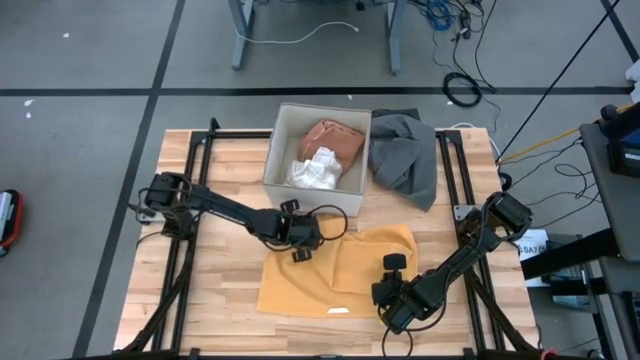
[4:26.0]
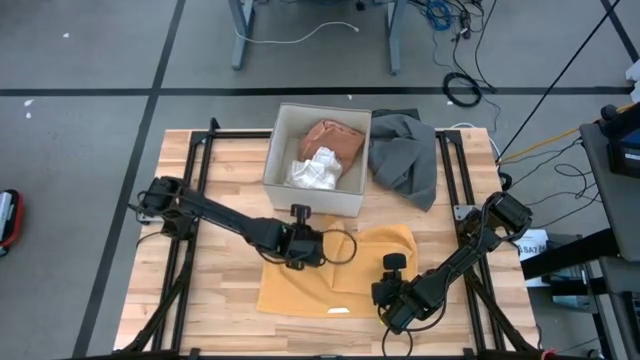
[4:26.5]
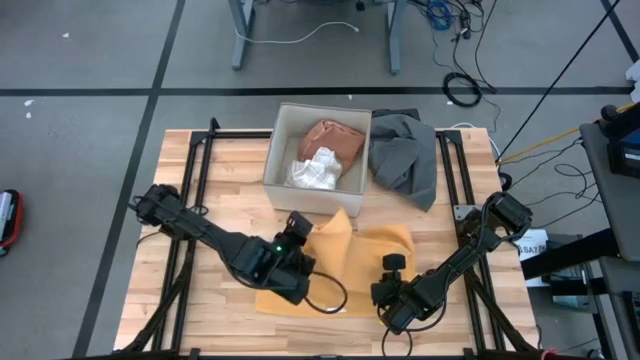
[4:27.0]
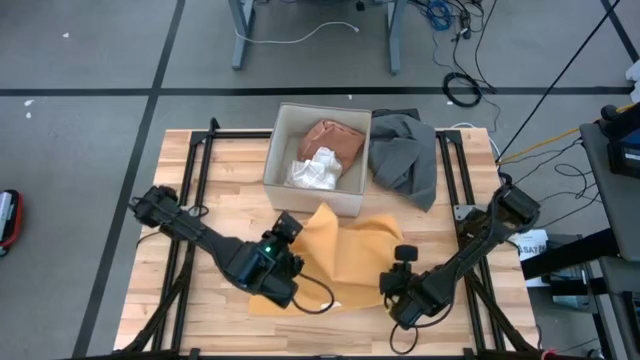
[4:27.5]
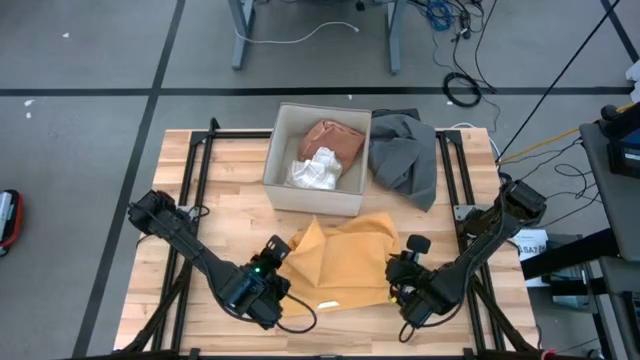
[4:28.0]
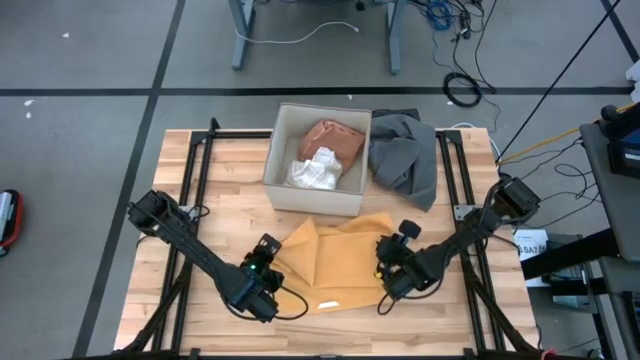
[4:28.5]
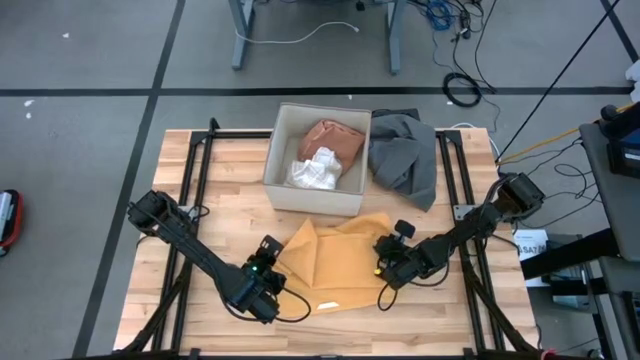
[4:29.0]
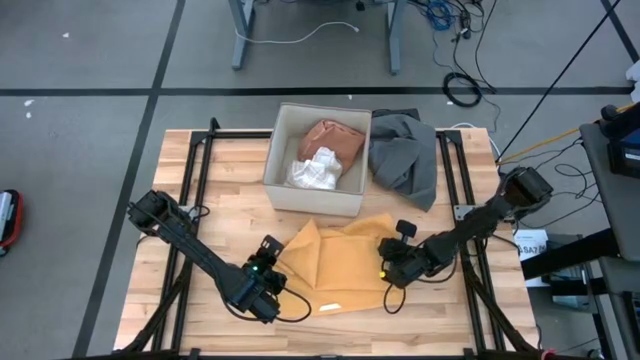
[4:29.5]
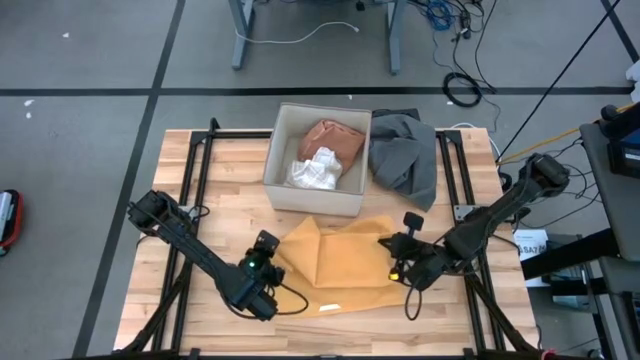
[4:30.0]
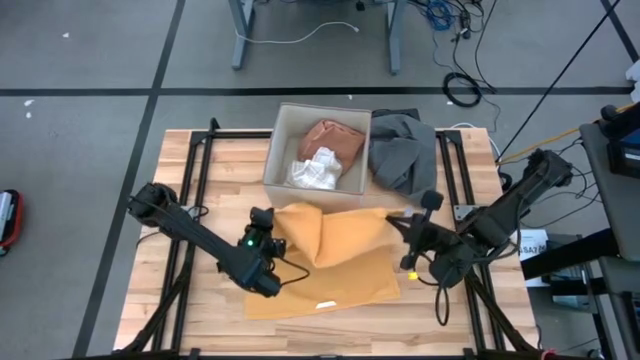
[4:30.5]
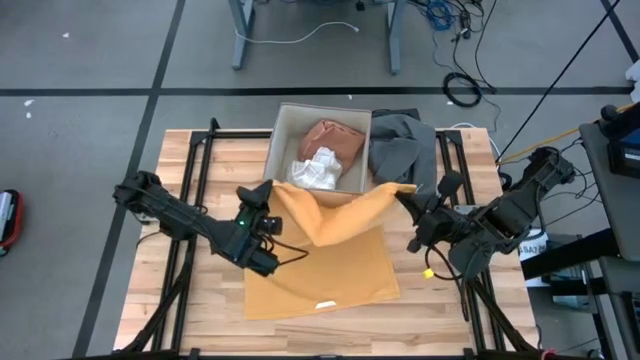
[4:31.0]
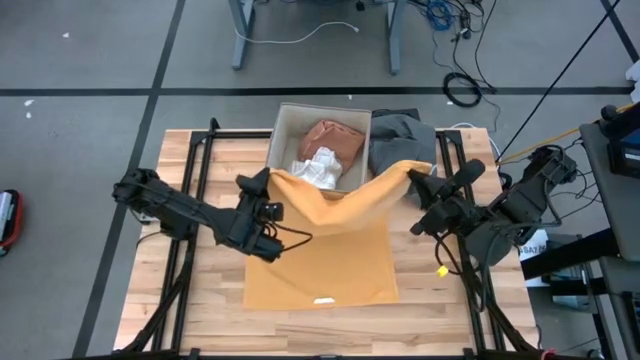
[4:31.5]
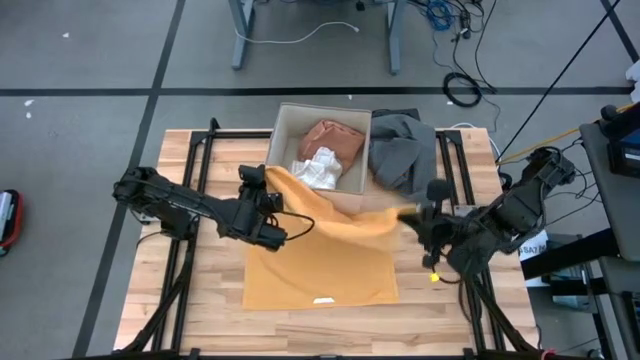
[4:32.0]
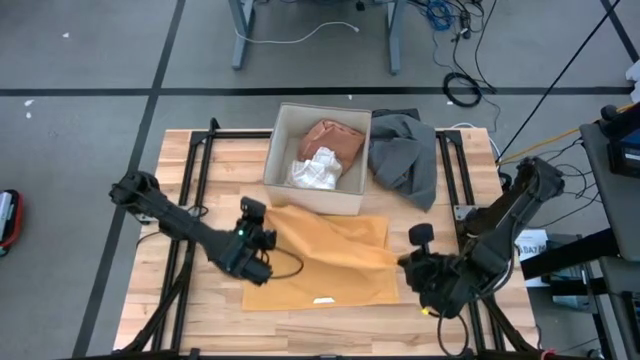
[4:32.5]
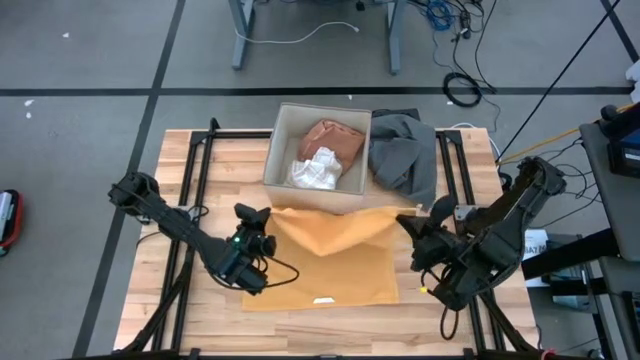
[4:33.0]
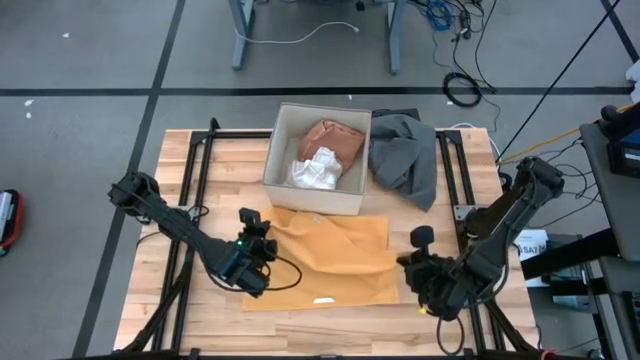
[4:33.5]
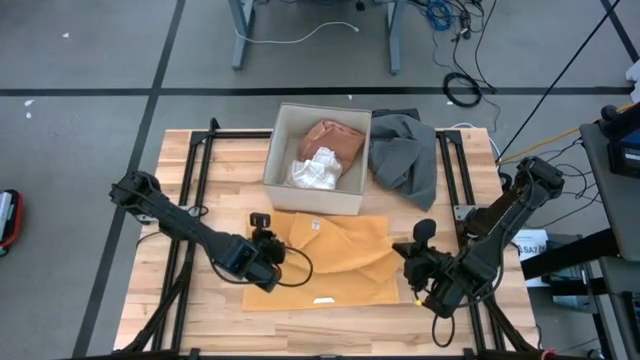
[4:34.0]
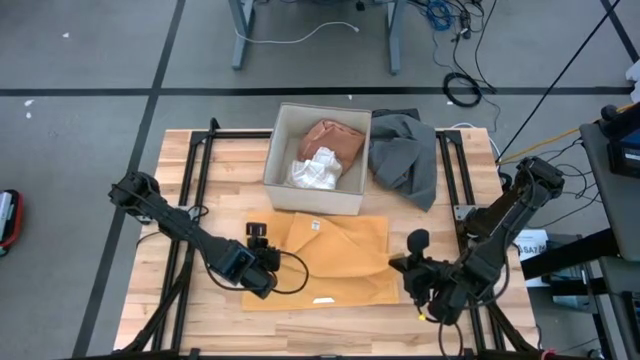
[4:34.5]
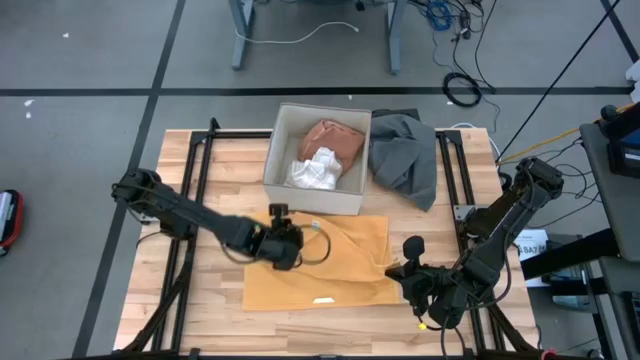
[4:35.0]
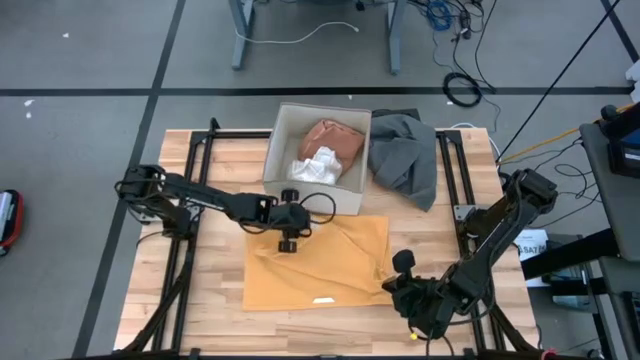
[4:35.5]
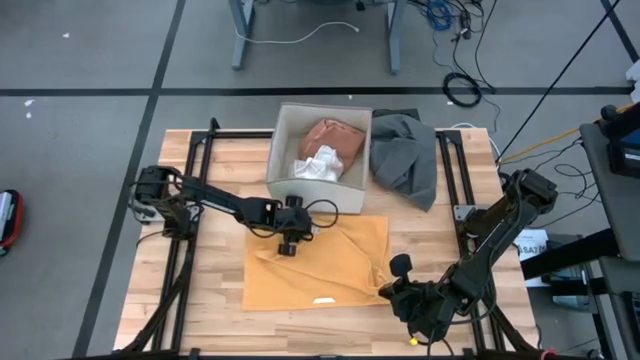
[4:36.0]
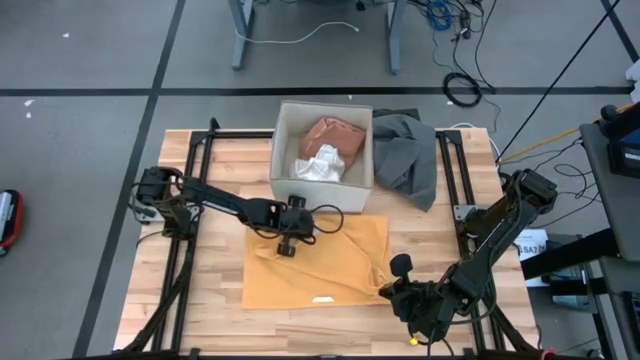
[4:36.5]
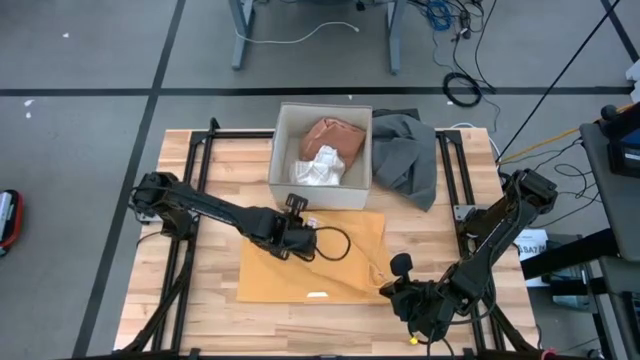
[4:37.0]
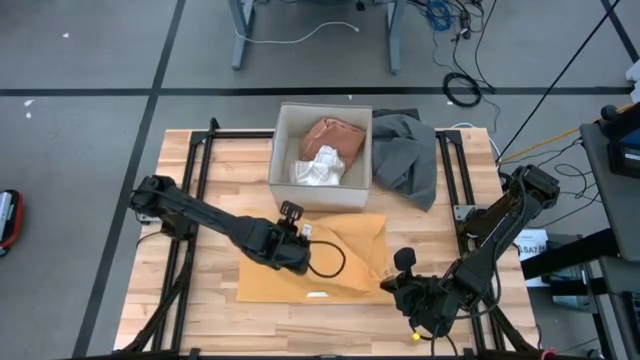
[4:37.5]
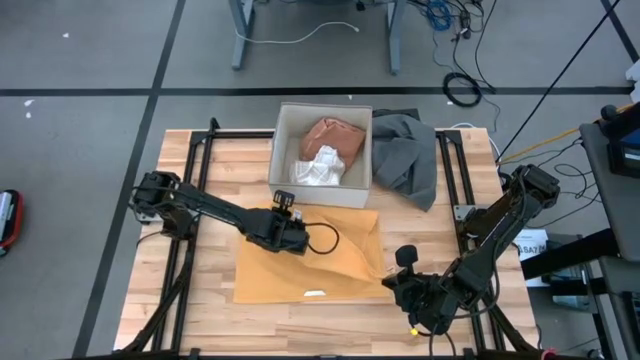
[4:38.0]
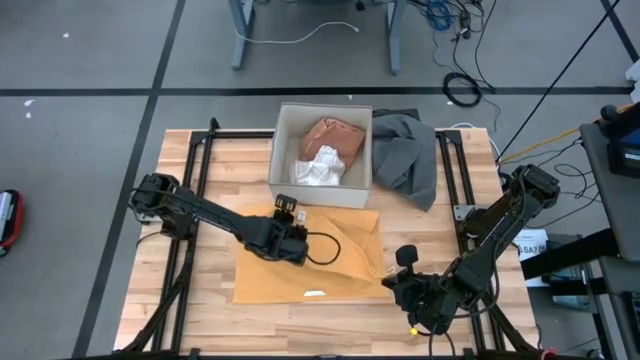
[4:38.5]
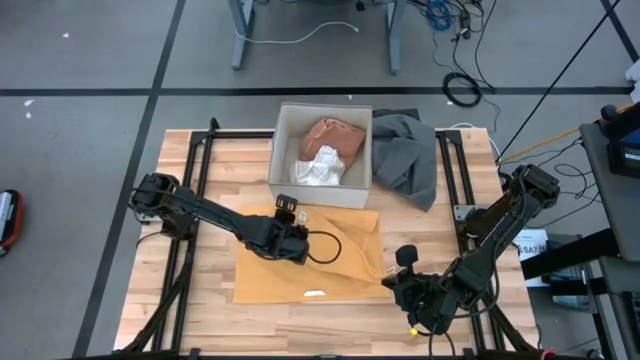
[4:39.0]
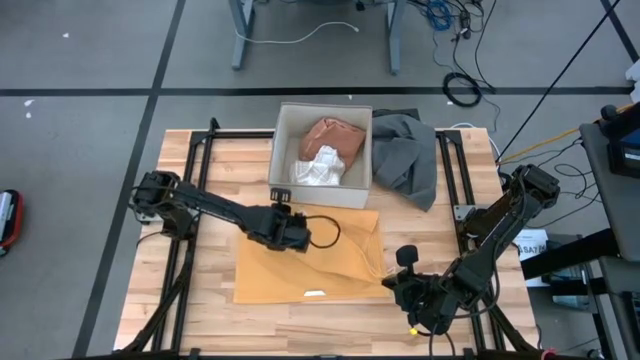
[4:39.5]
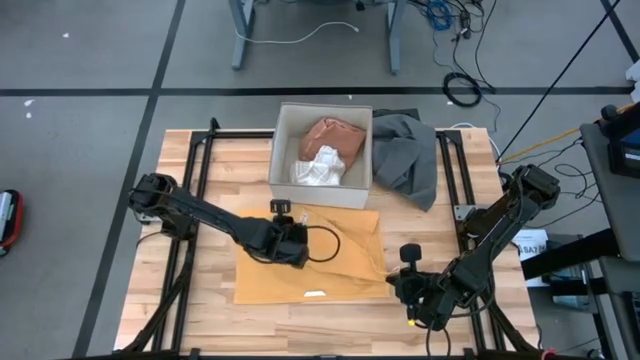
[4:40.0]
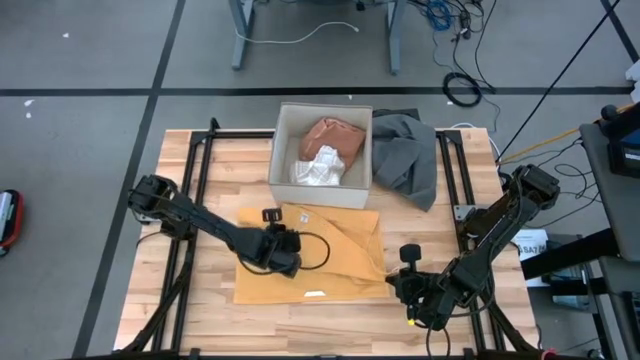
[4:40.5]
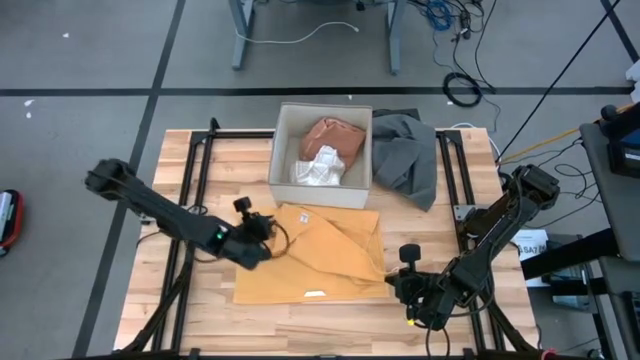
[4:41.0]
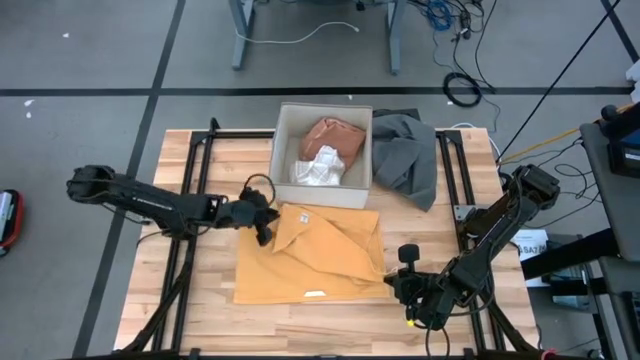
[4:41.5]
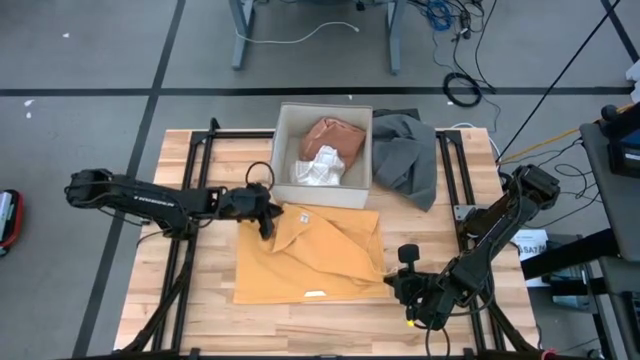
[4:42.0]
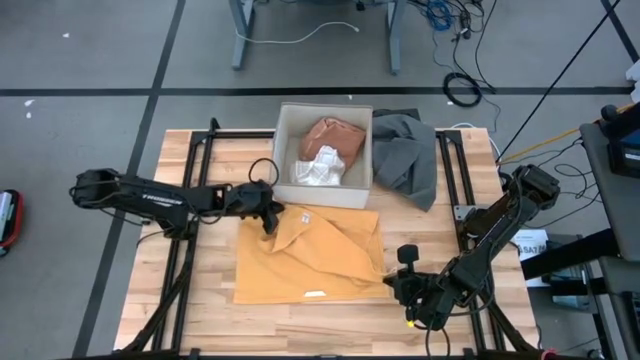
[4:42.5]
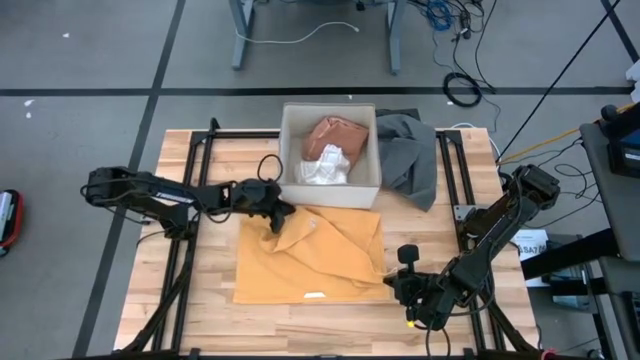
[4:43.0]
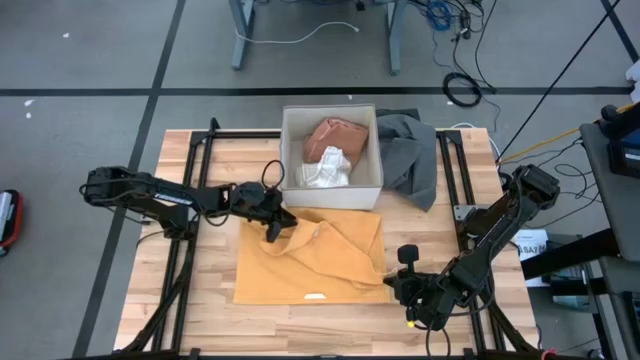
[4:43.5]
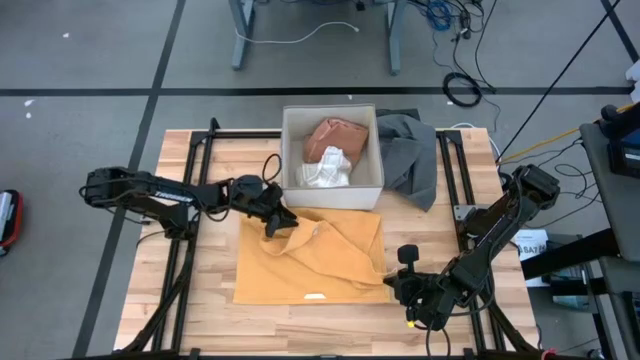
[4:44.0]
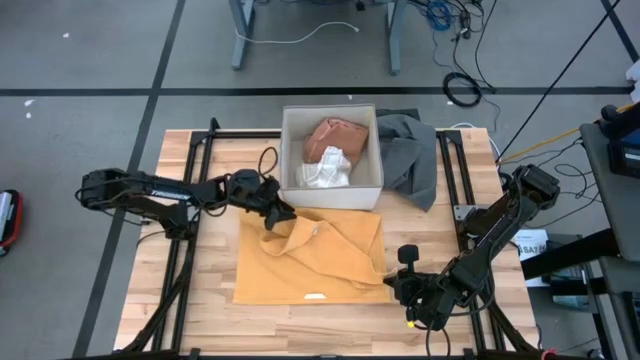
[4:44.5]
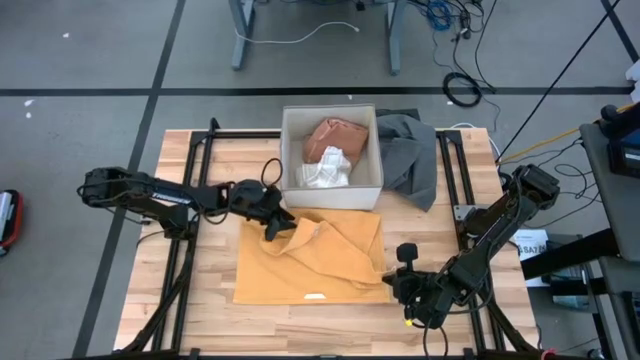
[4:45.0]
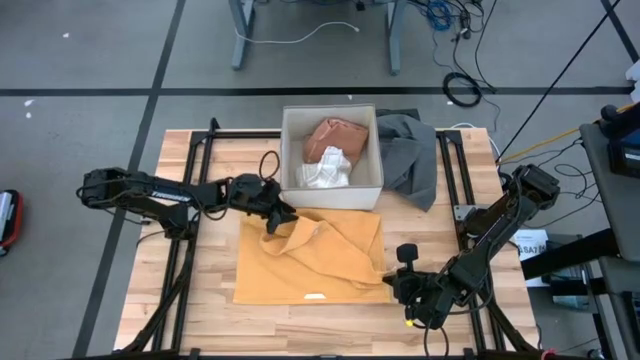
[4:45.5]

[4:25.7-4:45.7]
Task: Fold towel
Fold the orange towel
